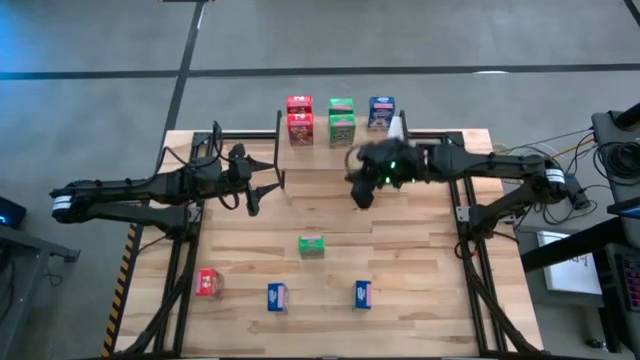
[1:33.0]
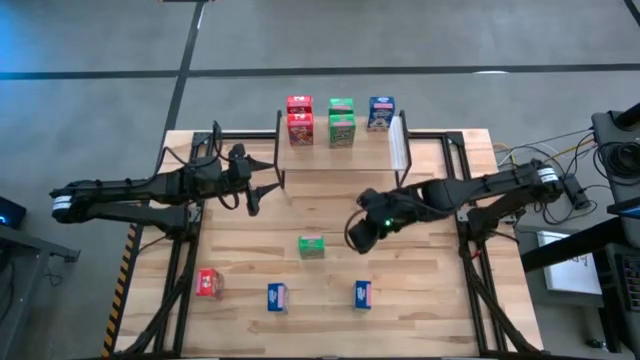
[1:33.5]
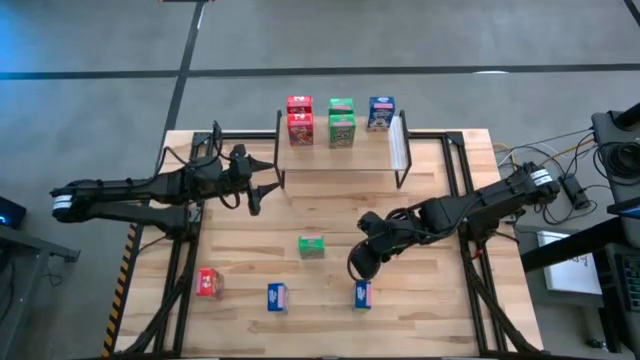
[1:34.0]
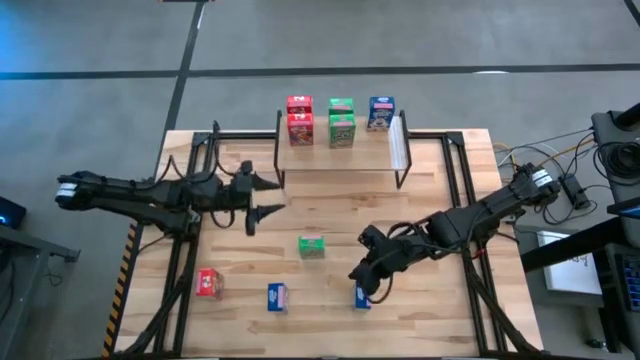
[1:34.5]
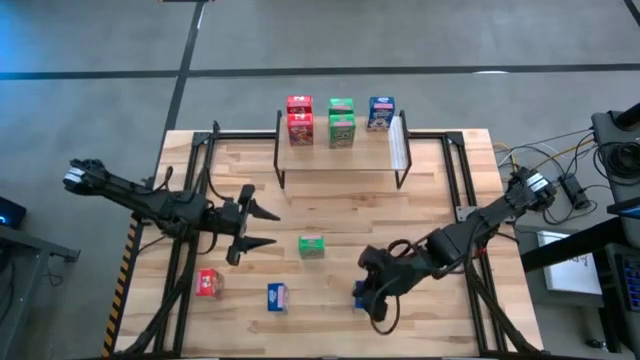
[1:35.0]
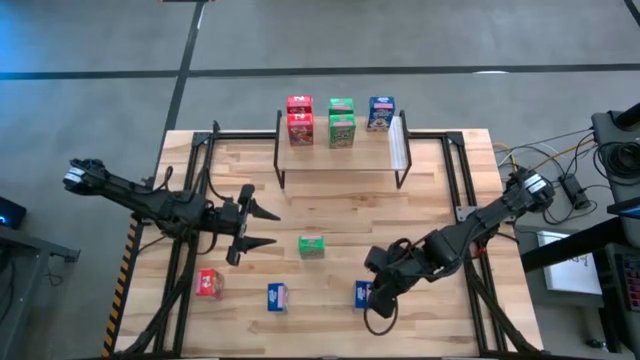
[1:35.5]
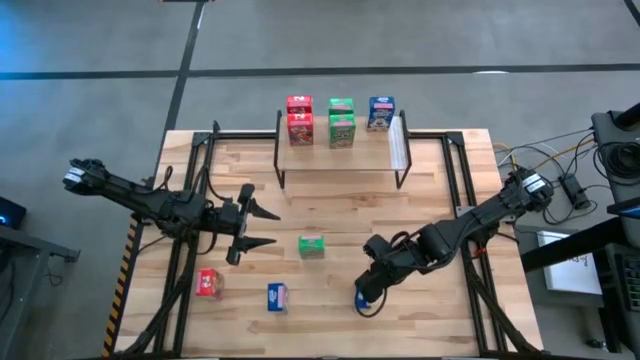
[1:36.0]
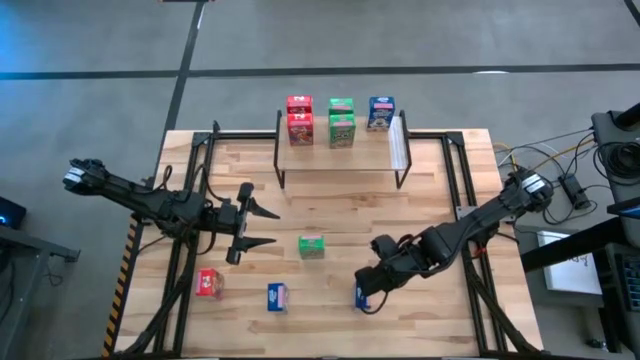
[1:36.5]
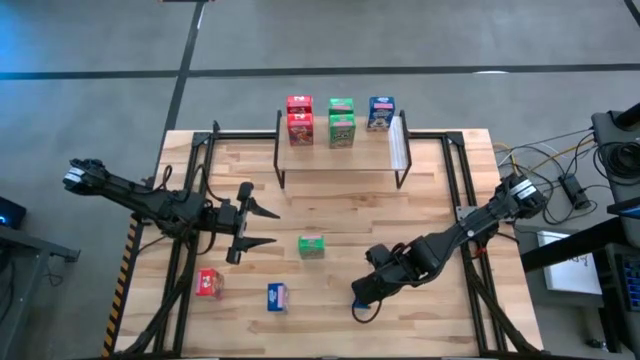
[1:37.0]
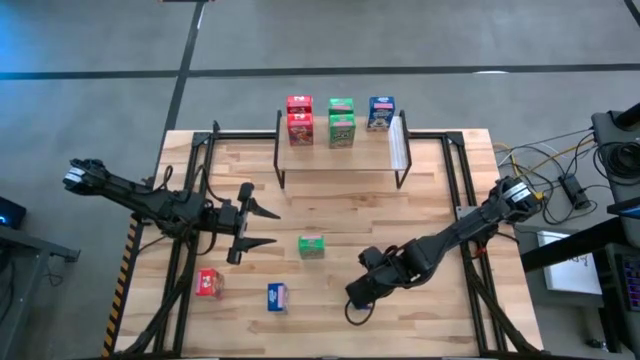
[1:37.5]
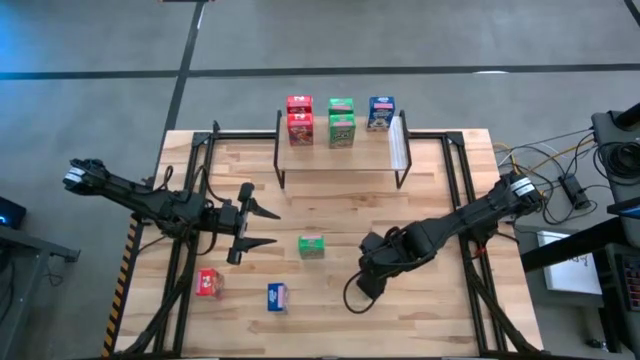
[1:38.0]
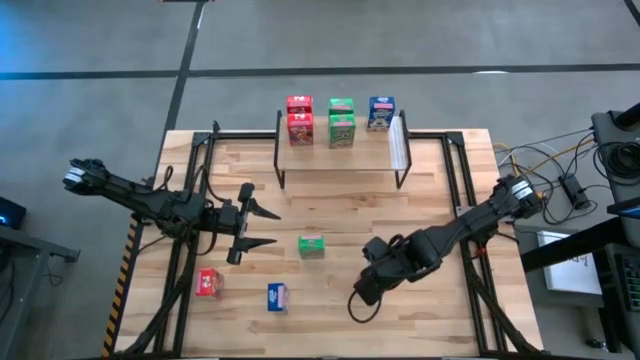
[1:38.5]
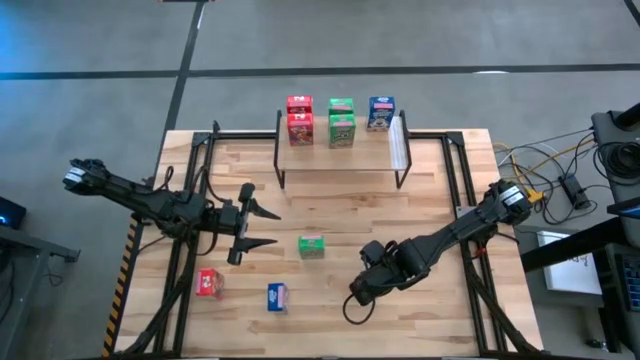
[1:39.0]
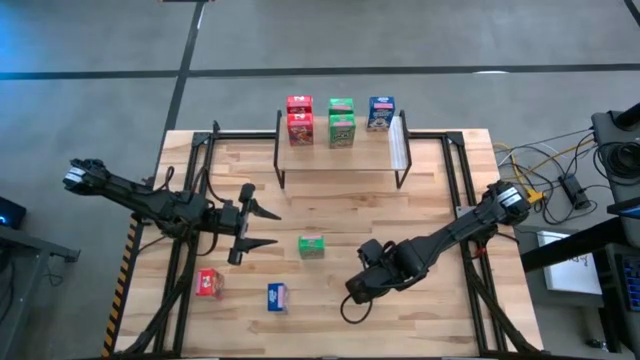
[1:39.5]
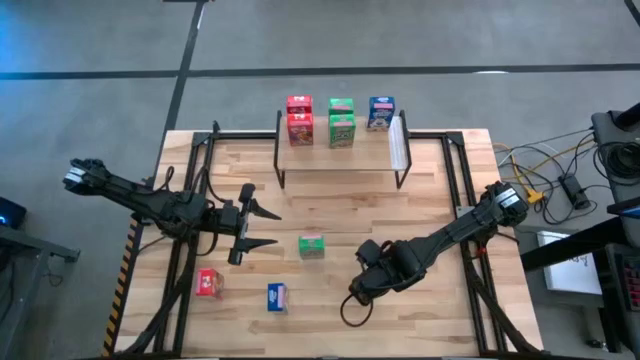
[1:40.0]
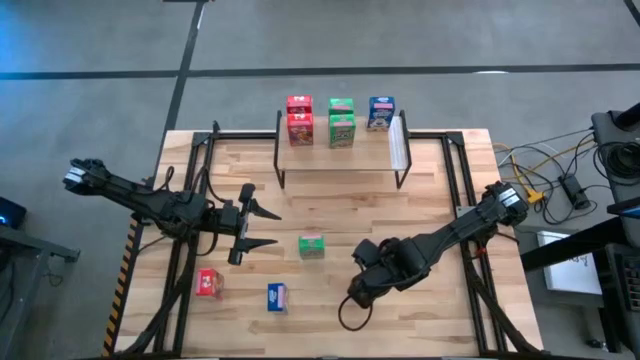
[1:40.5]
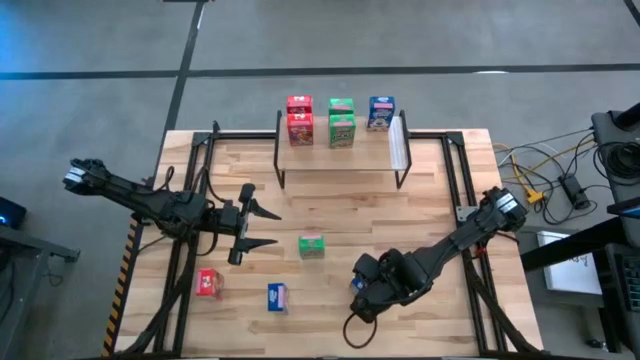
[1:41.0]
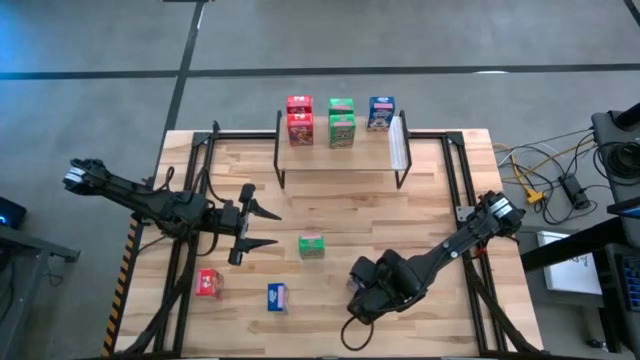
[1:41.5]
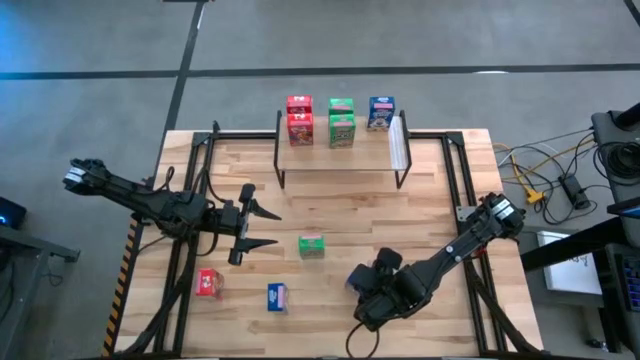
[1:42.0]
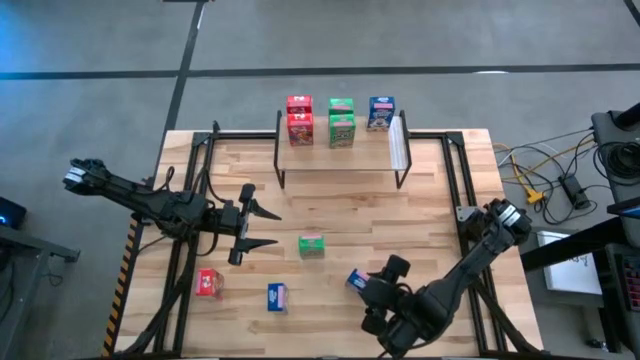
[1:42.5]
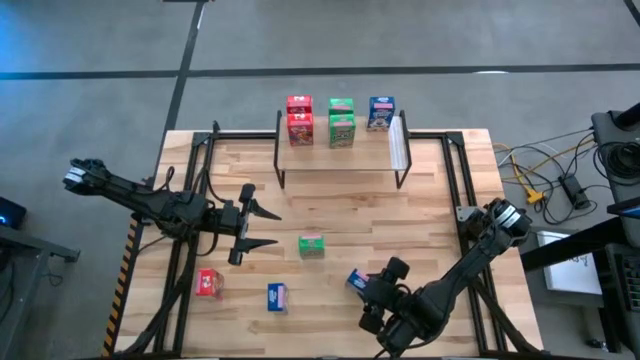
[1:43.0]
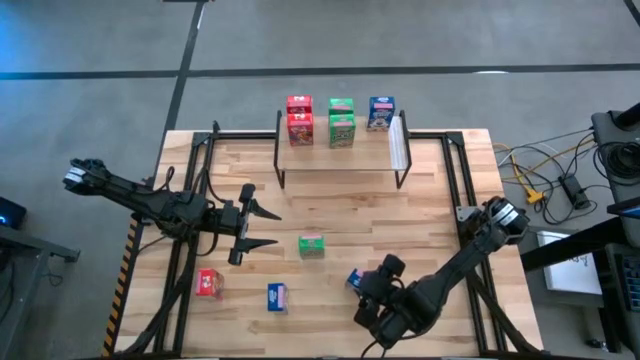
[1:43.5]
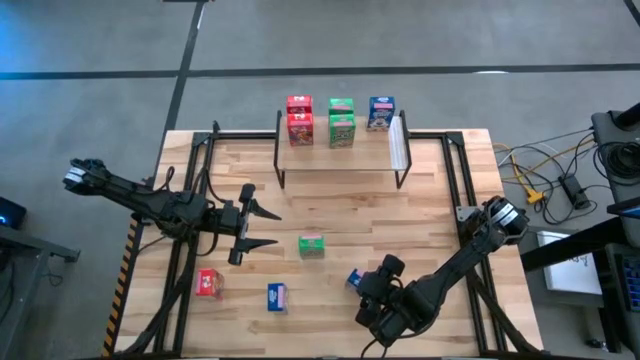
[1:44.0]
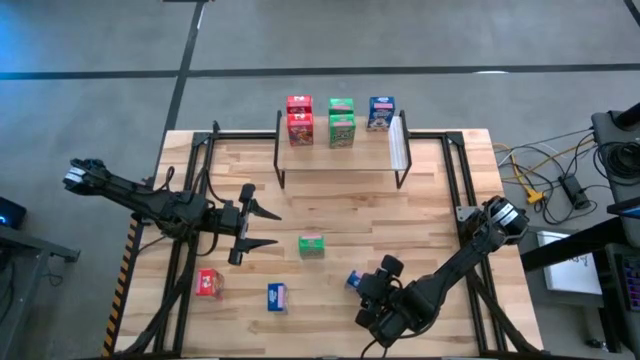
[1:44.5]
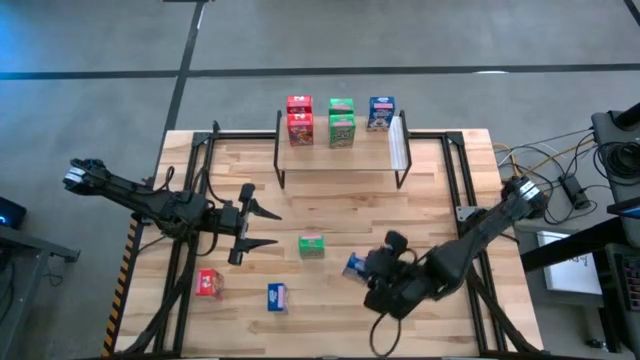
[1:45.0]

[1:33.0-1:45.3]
Task: Stack cereal on shelf
Put the right blue cereal box on the shelf

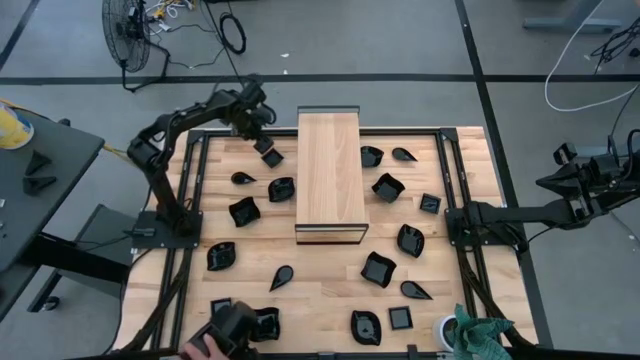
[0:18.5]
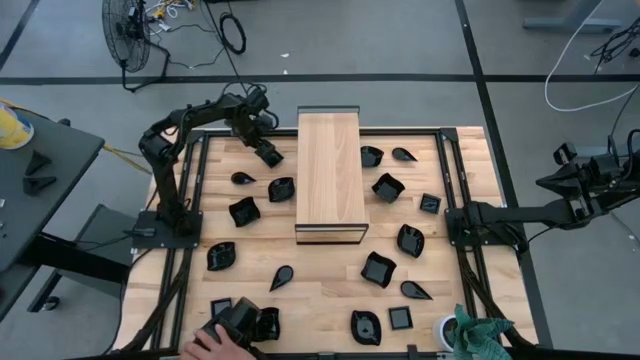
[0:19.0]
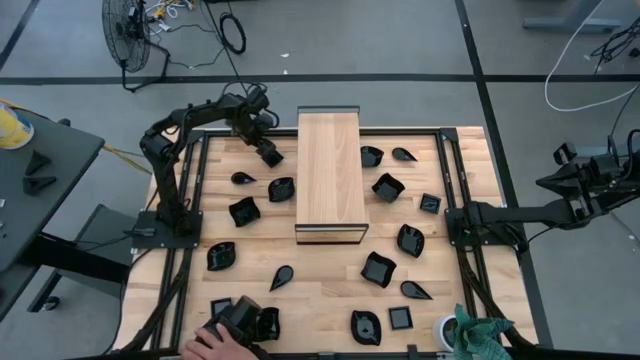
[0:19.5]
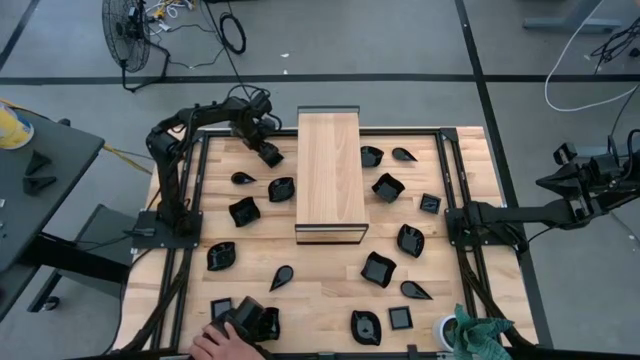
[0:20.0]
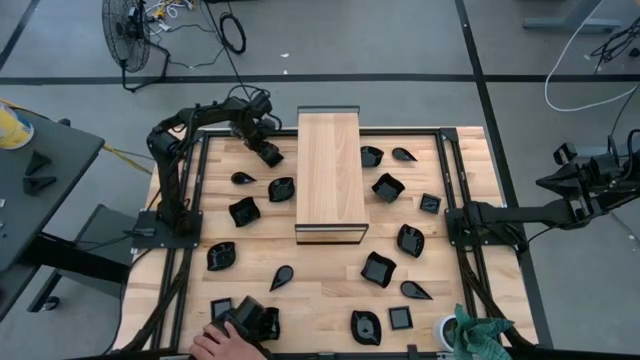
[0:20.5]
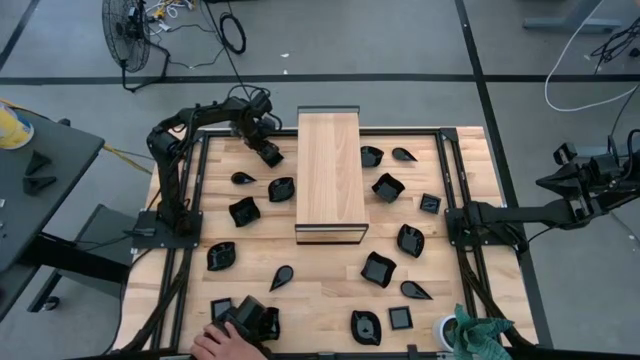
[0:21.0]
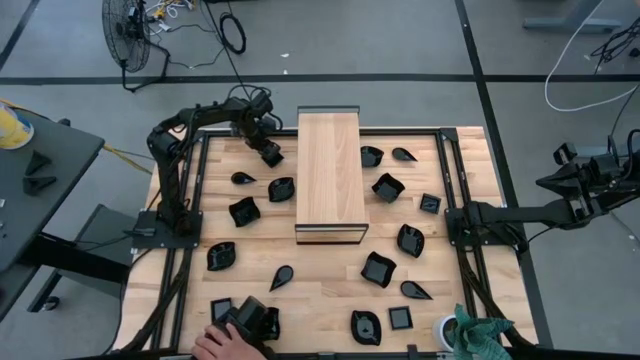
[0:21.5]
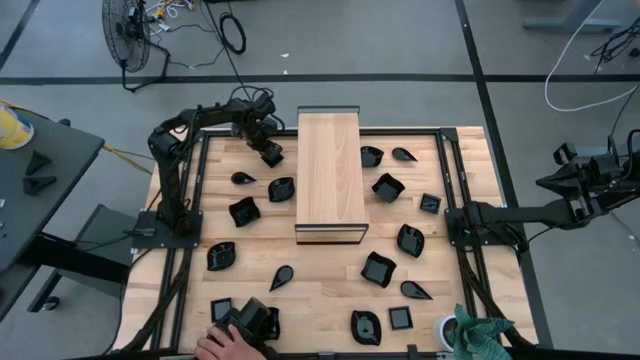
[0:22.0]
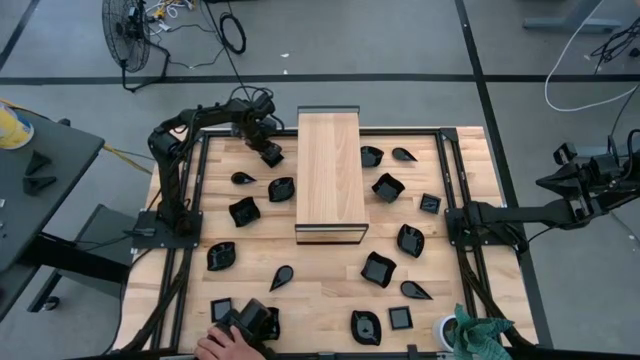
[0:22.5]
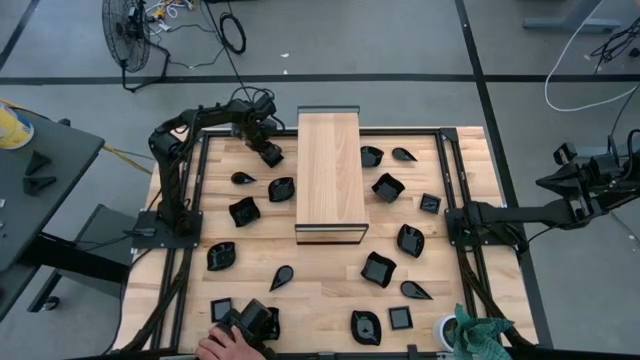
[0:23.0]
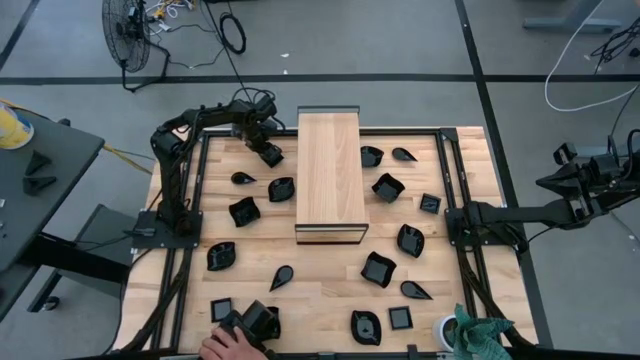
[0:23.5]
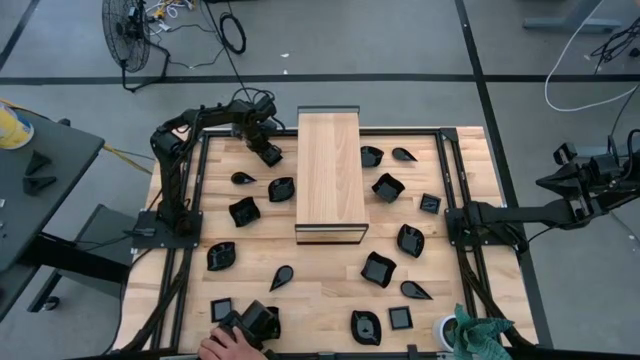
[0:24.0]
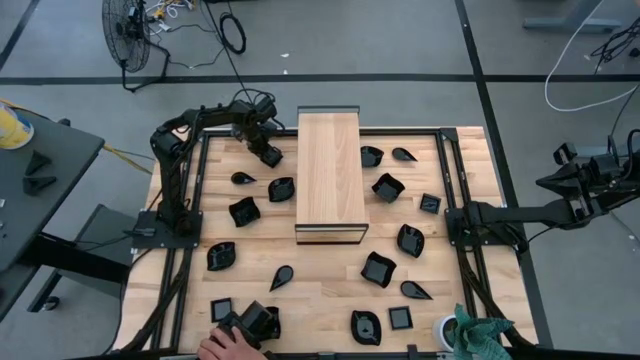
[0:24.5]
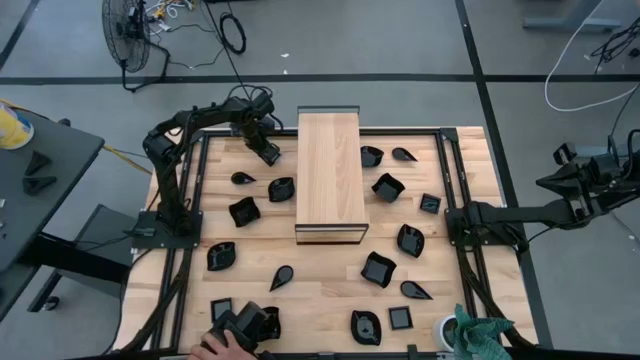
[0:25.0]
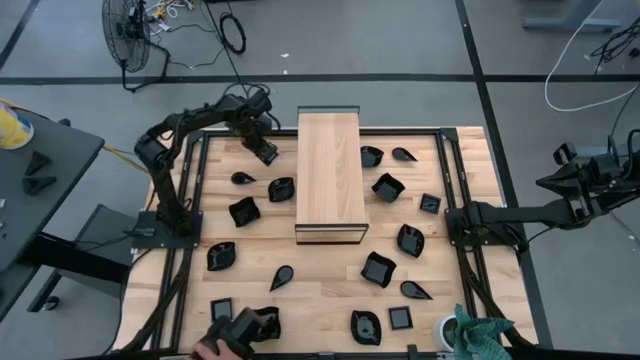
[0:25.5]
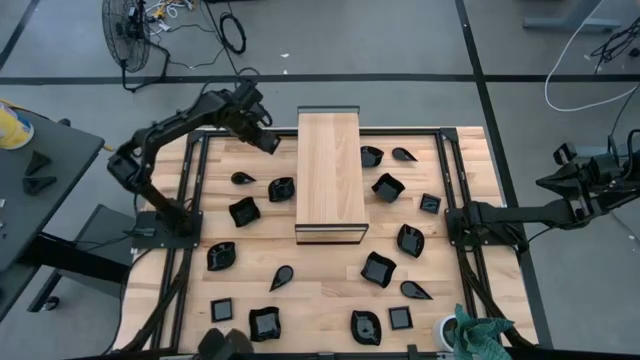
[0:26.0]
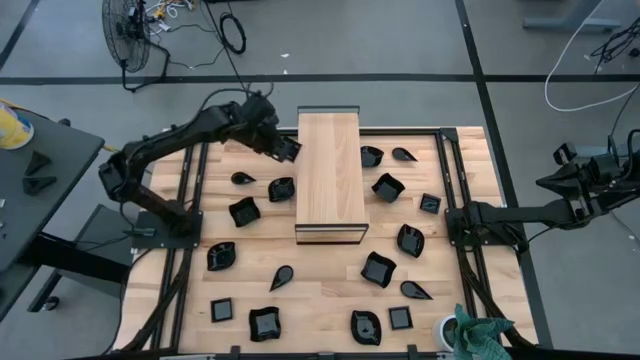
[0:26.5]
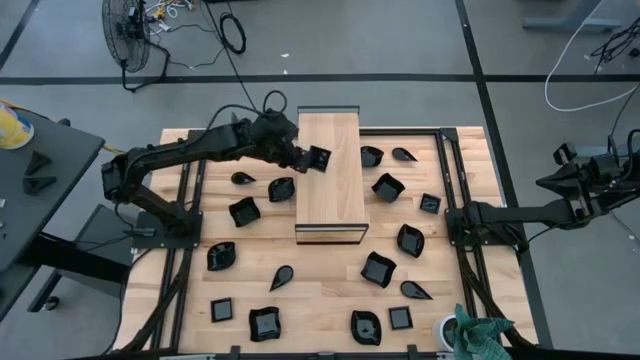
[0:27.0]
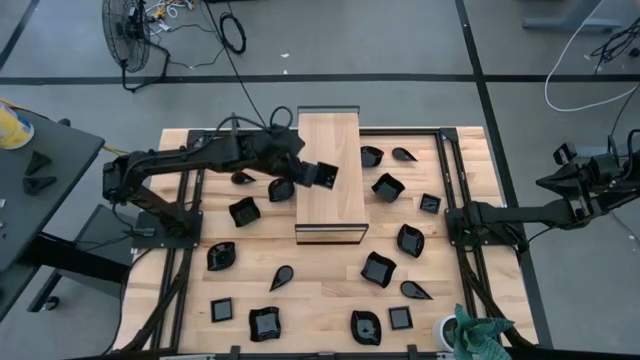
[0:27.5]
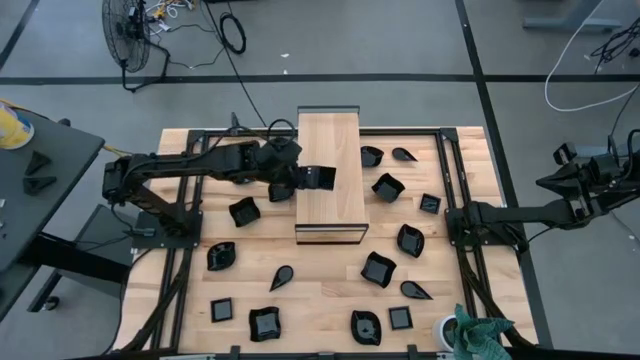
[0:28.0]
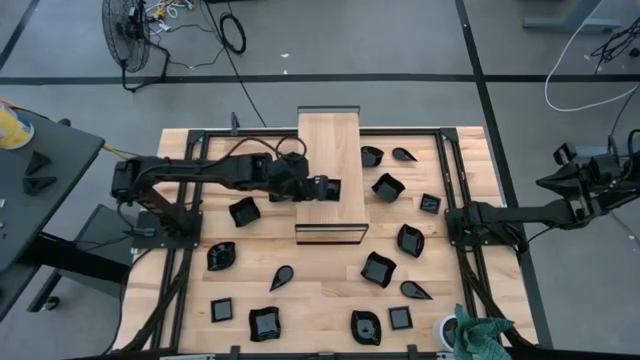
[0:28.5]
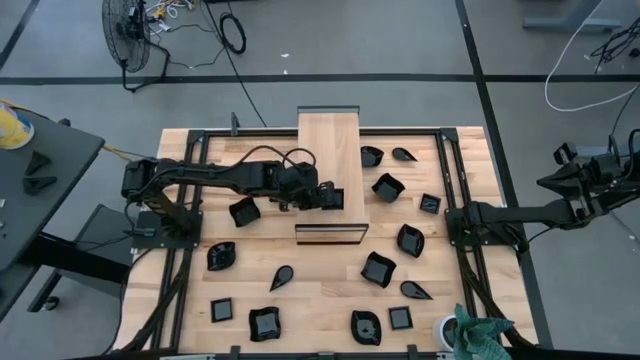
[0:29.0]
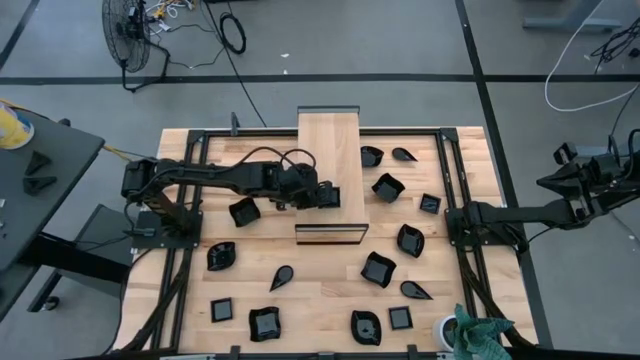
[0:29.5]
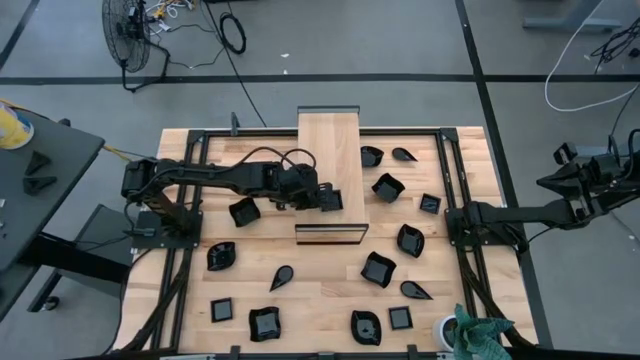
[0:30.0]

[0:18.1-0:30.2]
Task: Pick & Place Mini shaped plates
Put the square plate on the shelf
